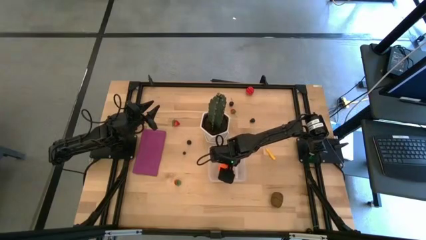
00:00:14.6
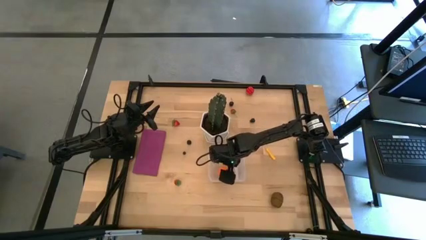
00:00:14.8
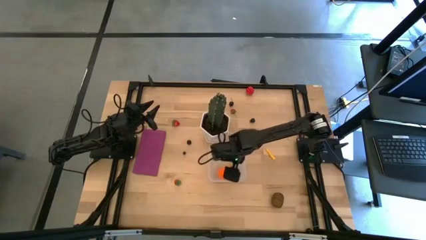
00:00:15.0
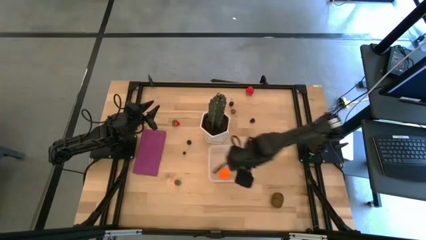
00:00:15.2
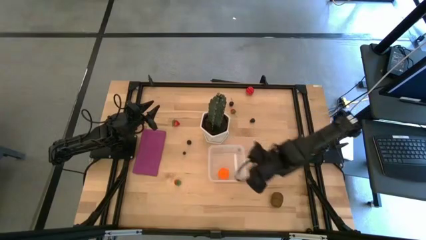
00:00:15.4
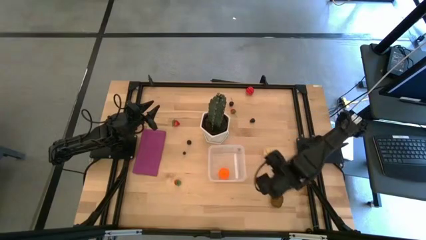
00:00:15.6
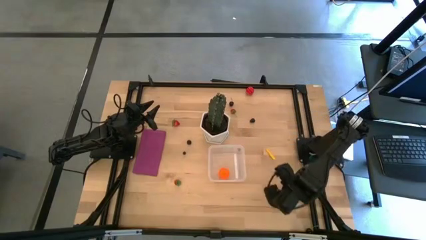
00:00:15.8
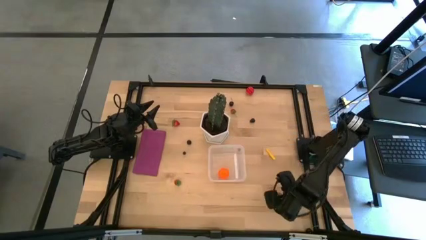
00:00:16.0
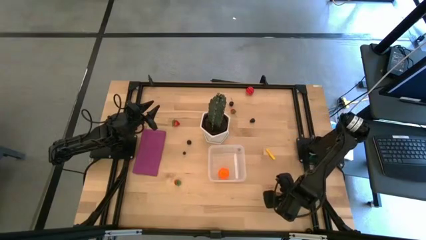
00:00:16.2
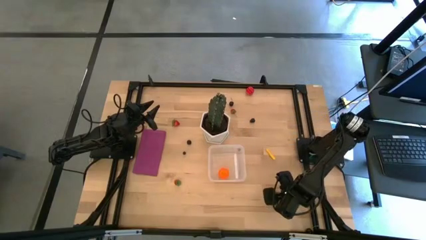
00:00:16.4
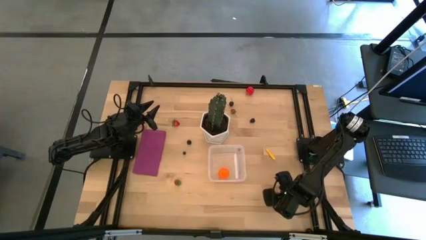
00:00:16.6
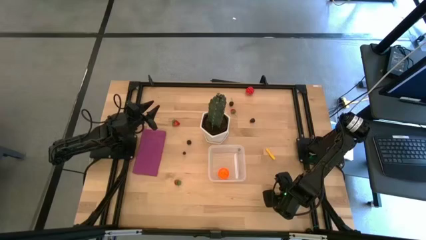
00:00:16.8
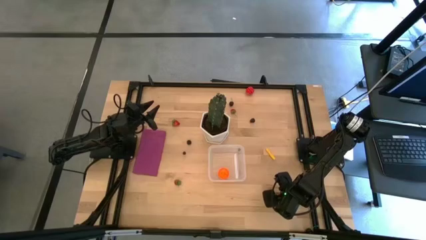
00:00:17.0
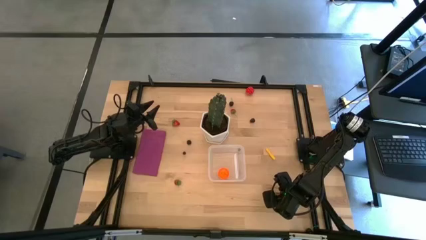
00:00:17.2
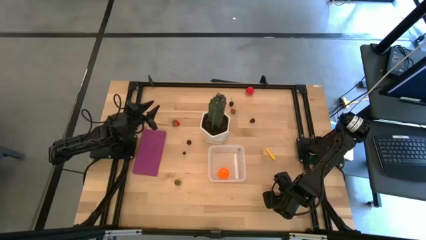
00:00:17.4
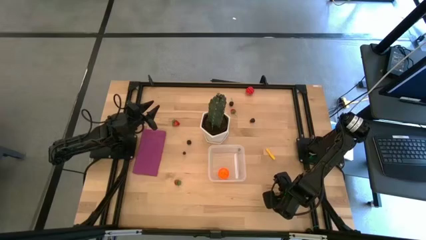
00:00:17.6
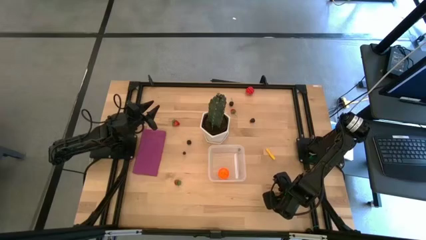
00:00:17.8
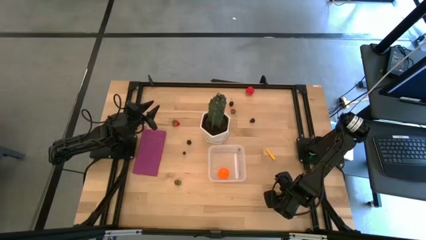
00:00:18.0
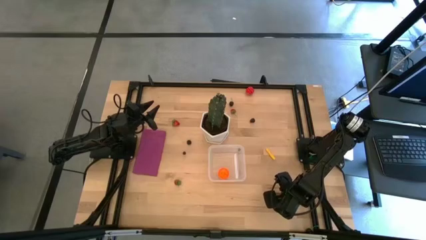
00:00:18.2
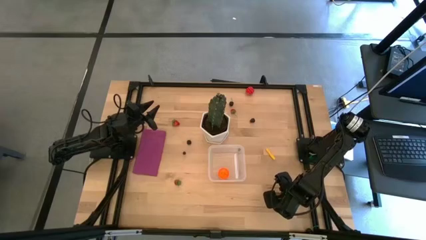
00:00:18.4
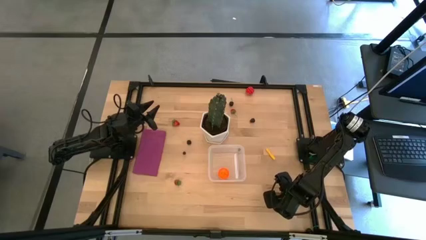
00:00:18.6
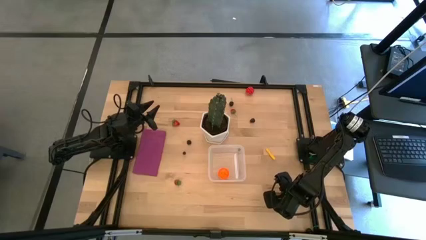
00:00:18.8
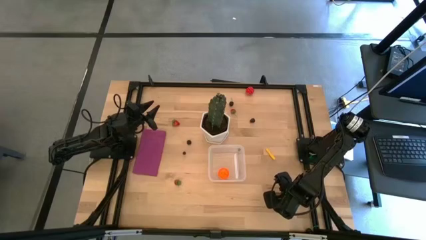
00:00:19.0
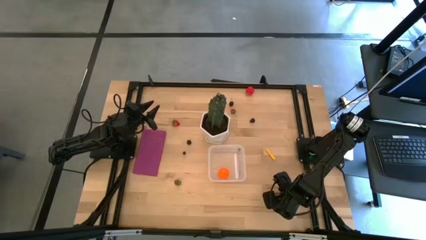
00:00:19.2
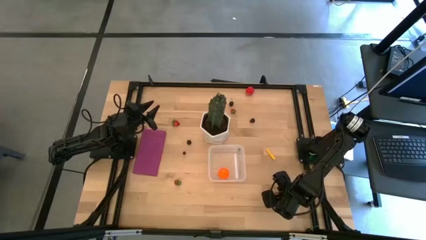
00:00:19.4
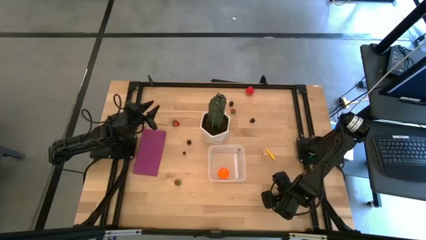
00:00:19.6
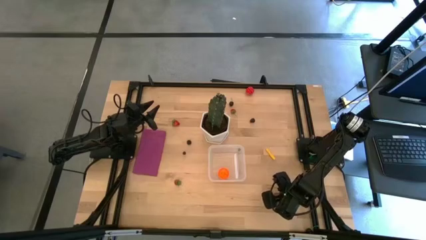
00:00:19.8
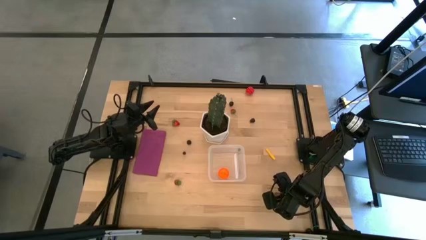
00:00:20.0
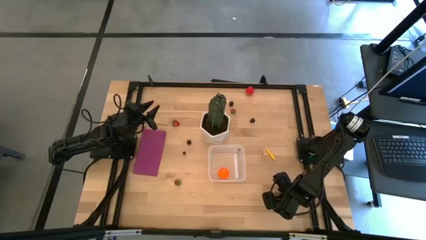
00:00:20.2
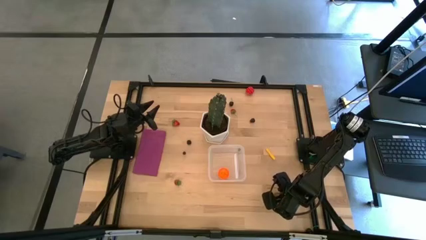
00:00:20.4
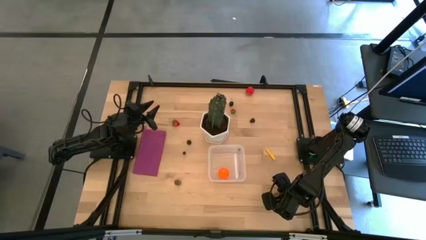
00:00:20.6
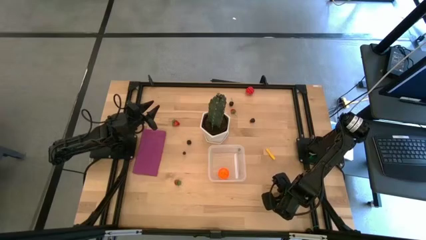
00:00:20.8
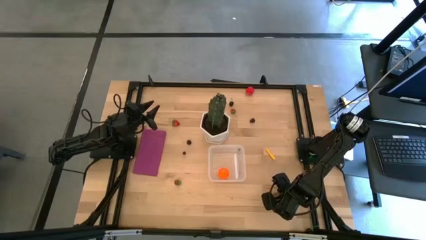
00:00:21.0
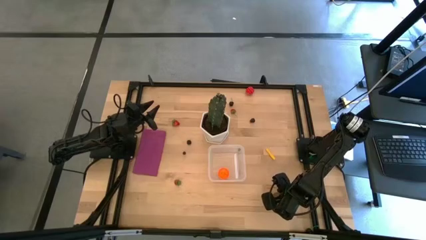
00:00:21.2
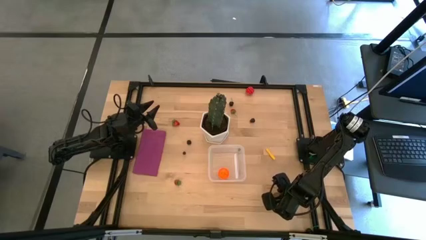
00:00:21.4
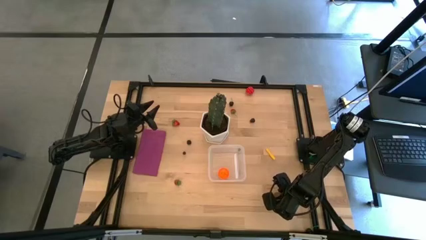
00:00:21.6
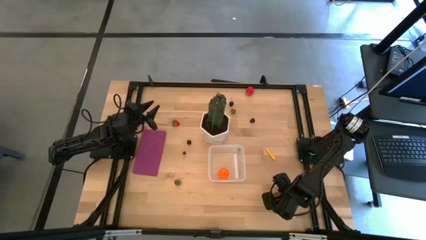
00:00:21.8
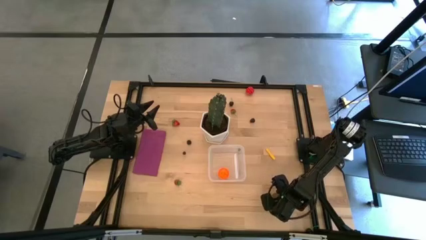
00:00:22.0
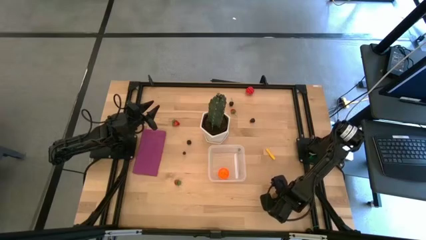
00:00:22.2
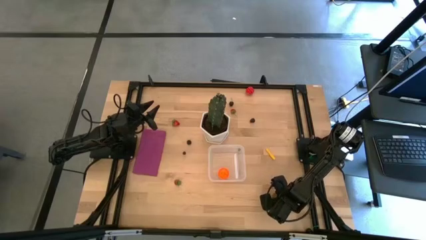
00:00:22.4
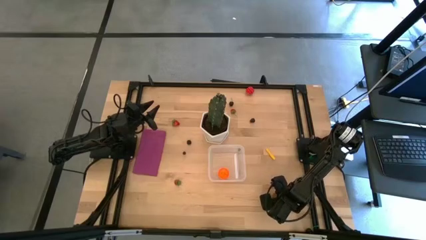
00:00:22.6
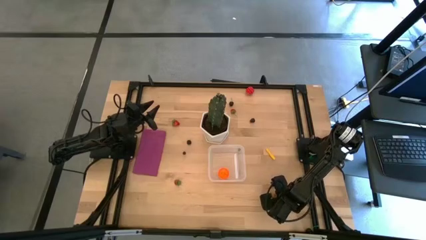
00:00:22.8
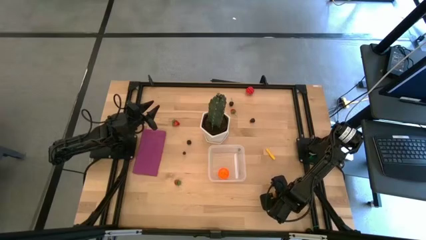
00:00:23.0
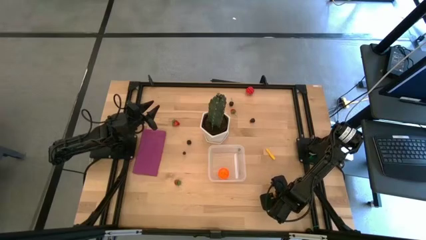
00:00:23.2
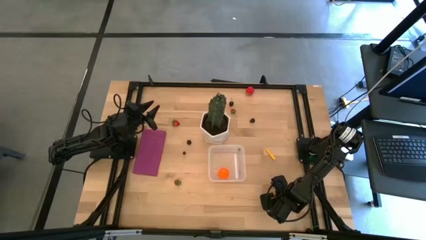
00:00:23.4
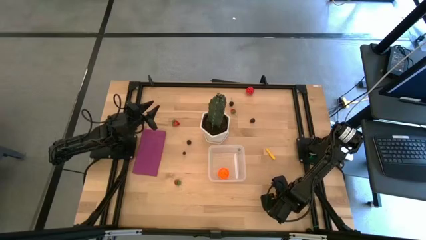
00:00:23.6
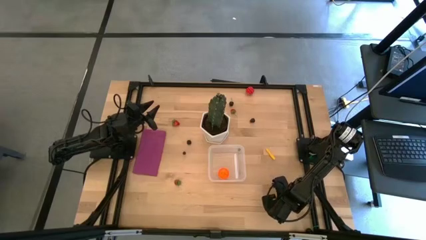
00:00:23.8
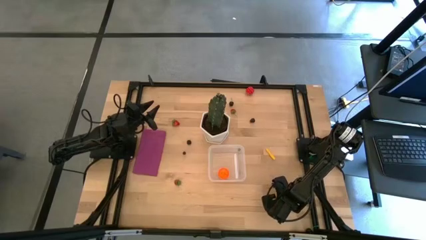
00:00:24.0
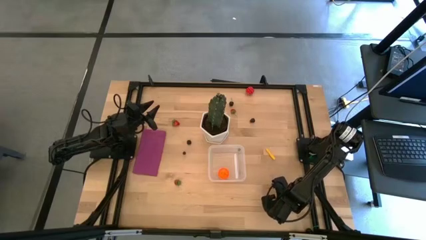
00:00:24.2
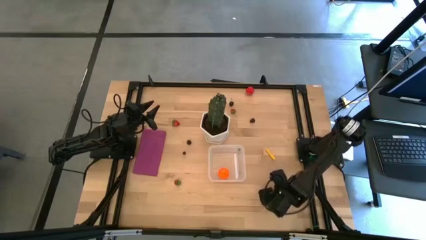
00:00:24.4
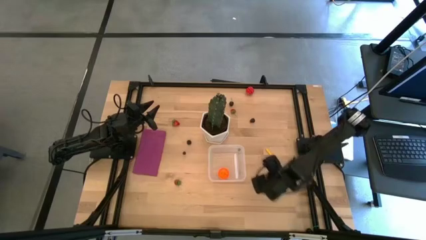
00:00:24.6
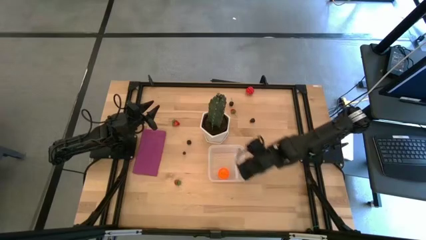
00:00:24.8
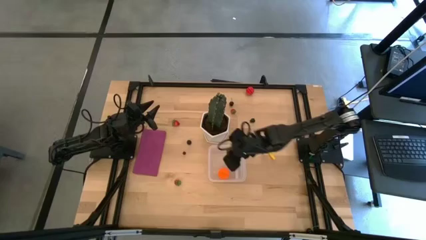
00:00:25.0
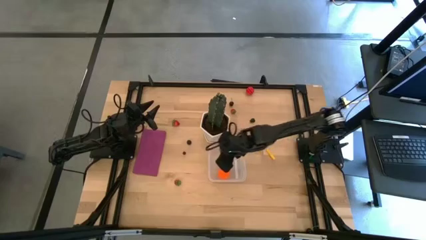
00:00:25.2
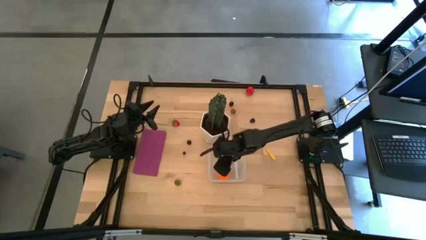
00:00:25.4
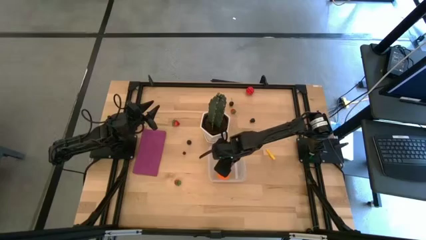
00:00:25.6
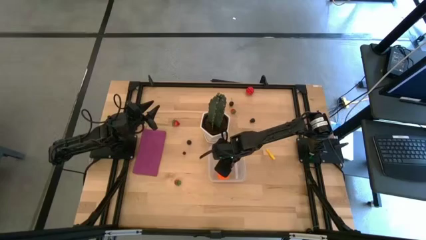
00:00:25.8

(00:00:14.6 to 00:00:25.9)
Task: Pick and placing Produce into tupperware
Put the brown kiwi into the transparent bin

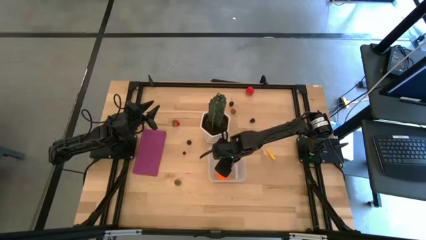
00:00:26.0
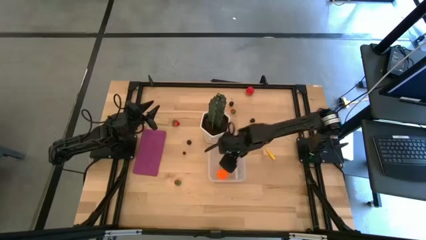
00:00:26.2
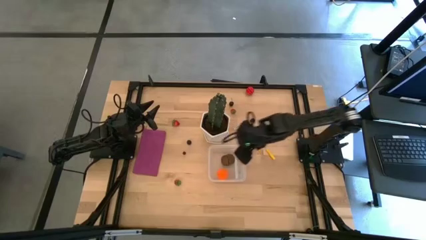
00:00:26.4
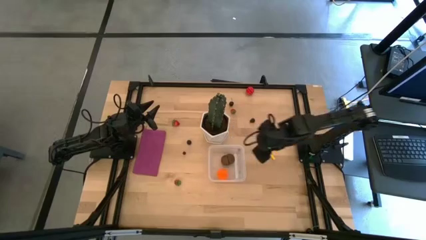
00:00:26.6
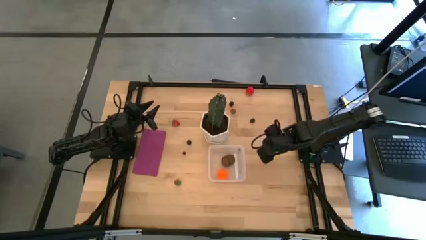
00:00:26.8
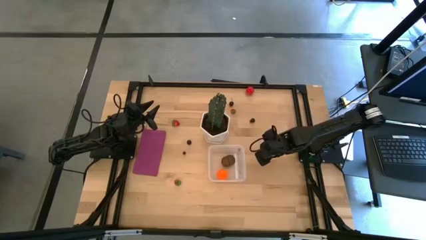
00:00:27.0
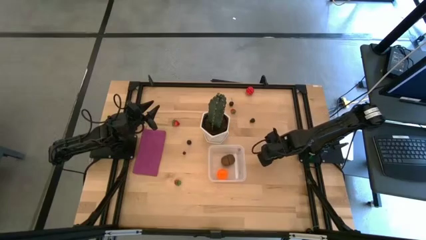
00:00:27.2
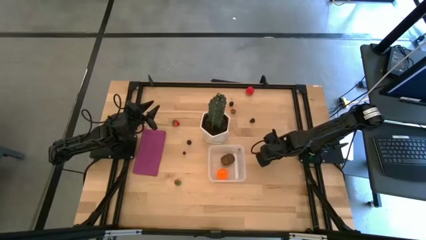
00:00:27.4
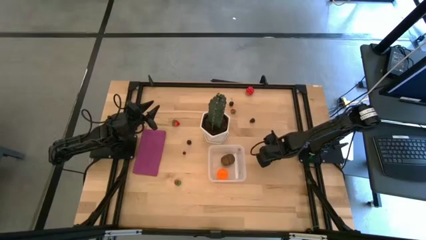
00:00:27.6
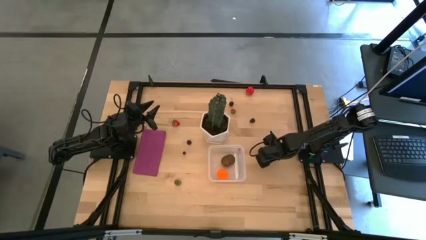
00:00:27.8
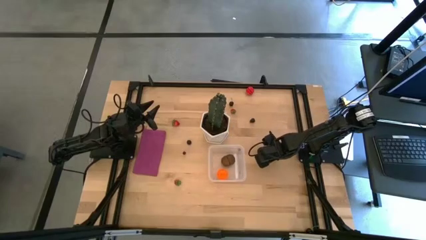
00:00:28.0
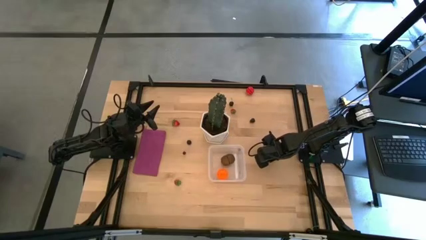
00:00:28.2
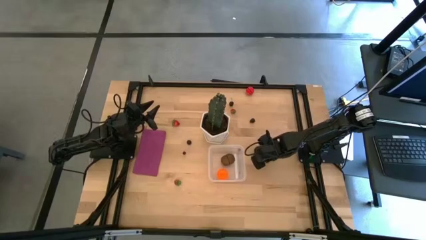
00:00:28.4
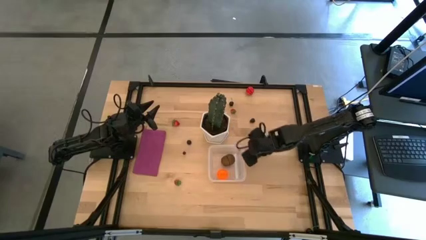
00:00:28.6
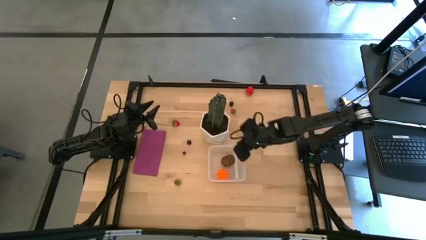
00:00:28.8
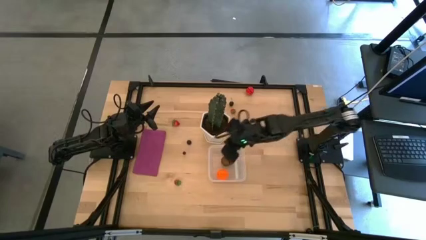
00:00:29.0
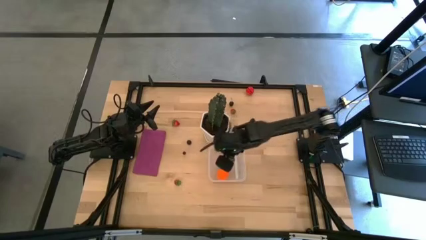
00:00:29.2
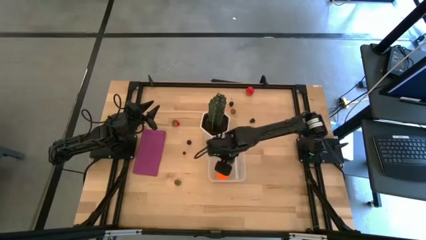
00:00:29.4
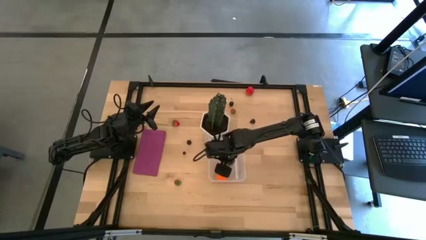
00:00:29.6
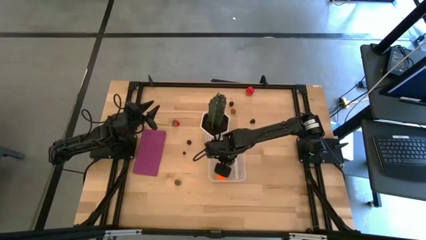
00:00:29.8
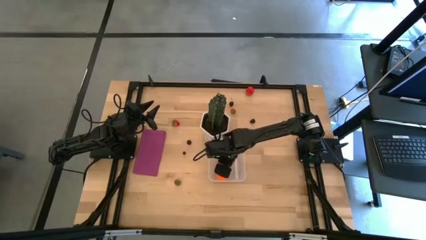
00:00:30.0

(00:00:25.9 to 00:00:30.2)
Put the yellow corn into the transparent bin
